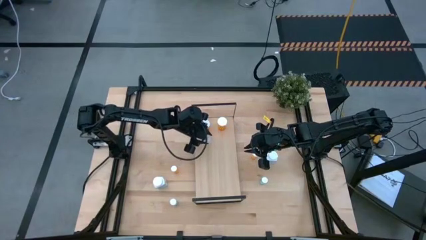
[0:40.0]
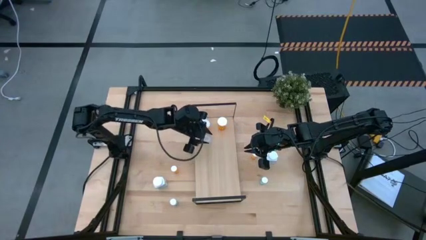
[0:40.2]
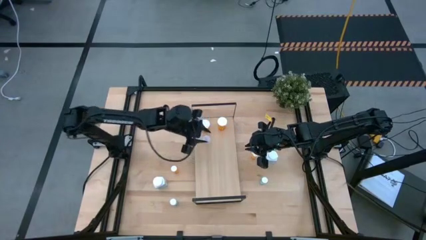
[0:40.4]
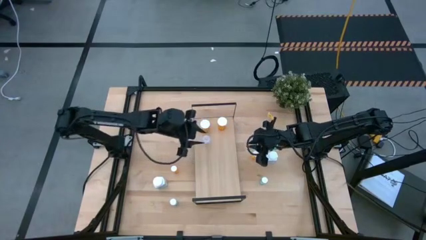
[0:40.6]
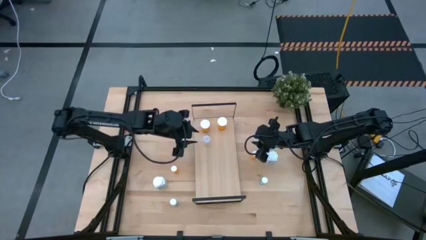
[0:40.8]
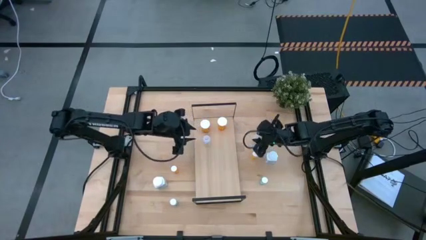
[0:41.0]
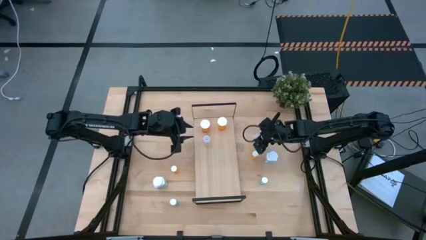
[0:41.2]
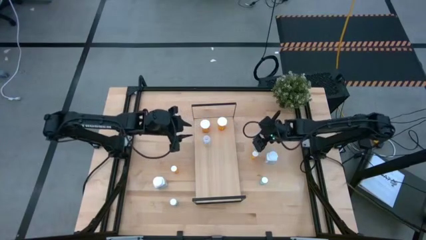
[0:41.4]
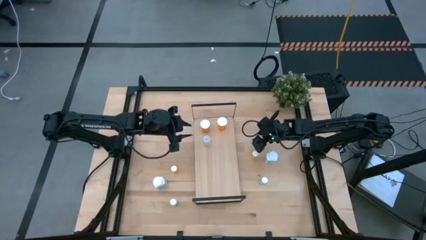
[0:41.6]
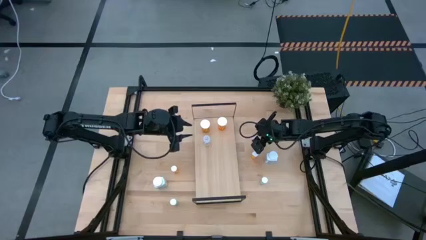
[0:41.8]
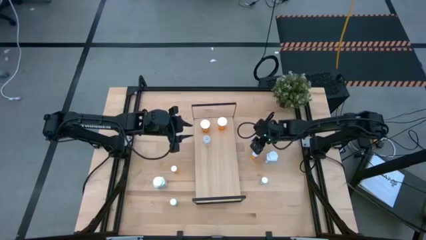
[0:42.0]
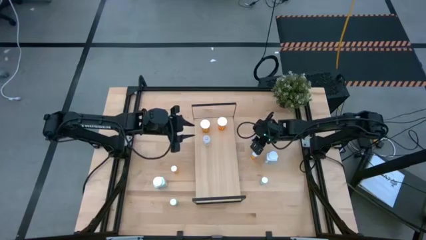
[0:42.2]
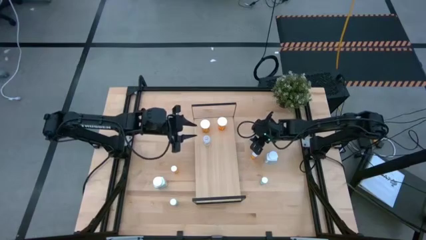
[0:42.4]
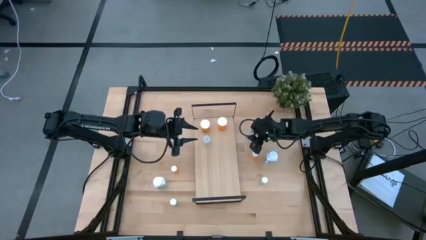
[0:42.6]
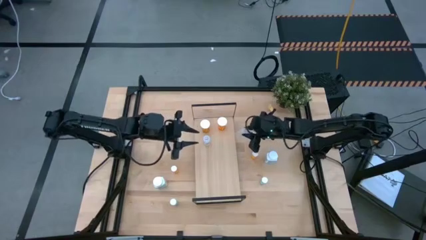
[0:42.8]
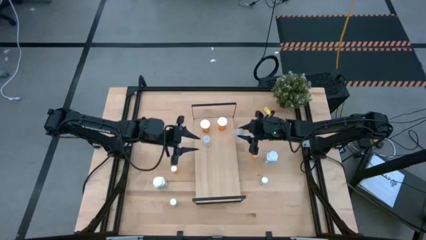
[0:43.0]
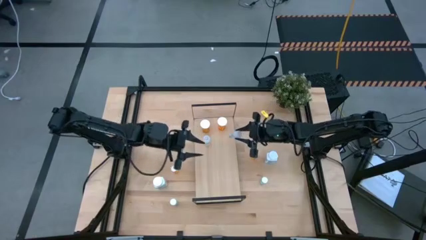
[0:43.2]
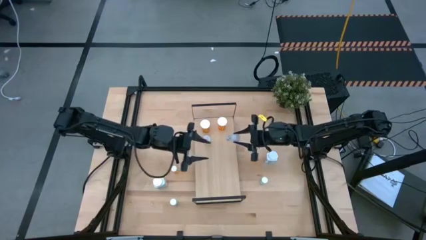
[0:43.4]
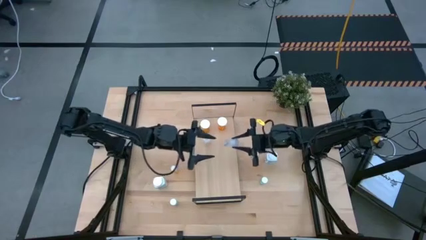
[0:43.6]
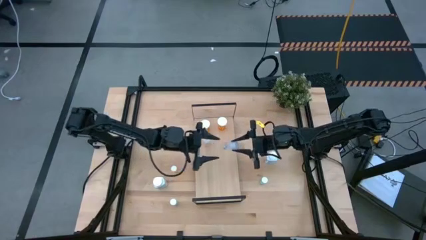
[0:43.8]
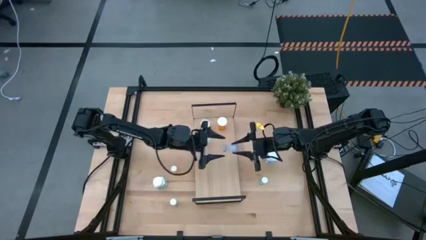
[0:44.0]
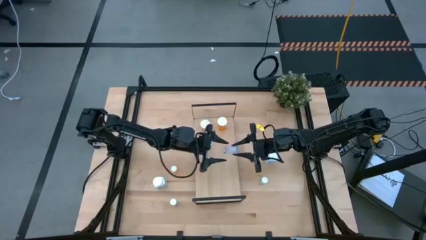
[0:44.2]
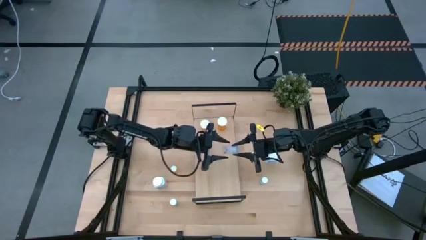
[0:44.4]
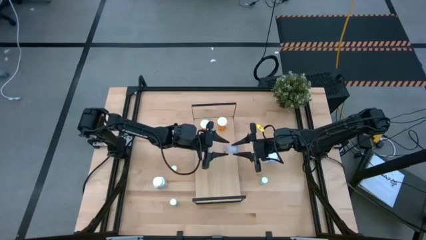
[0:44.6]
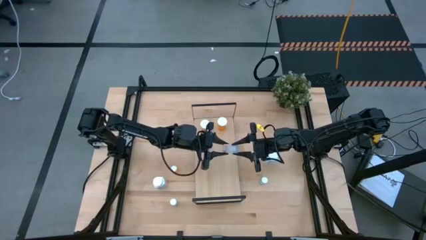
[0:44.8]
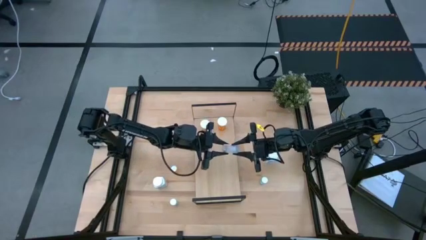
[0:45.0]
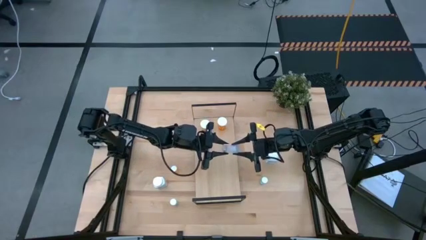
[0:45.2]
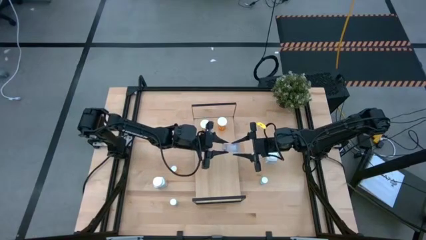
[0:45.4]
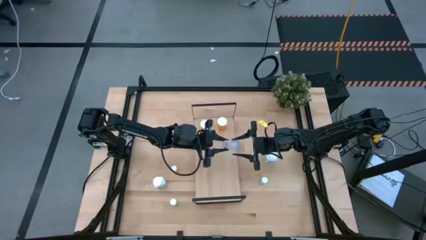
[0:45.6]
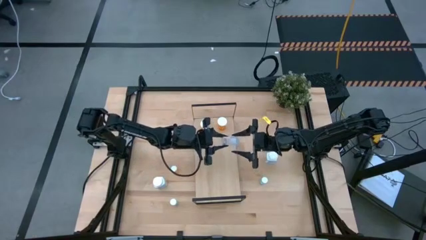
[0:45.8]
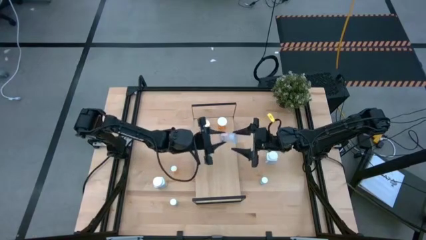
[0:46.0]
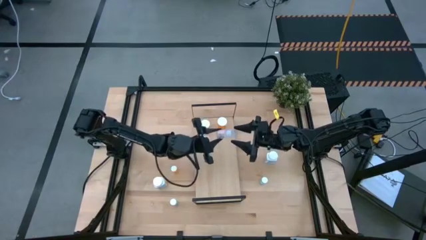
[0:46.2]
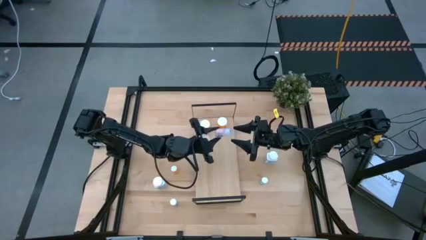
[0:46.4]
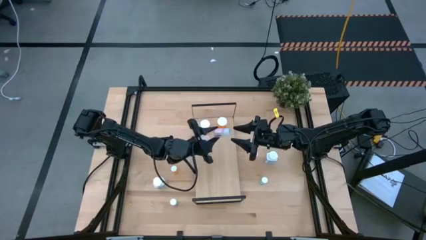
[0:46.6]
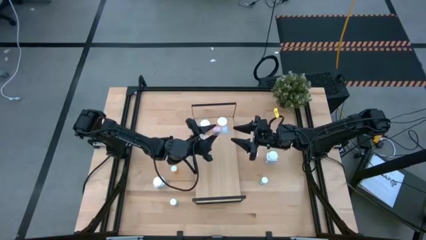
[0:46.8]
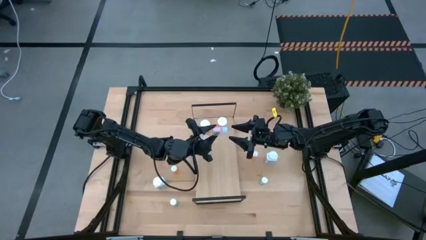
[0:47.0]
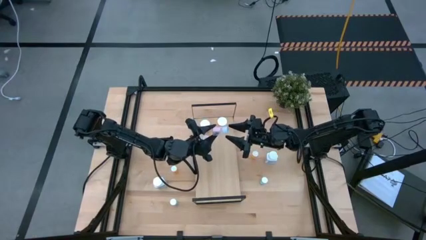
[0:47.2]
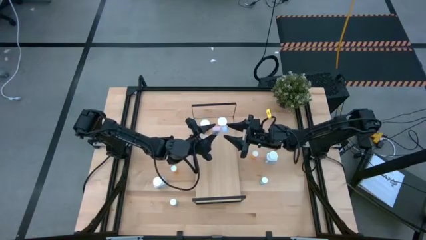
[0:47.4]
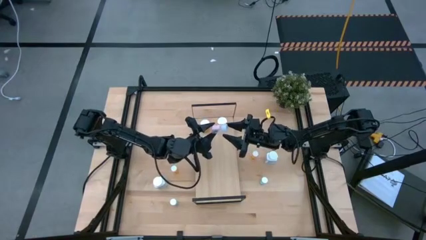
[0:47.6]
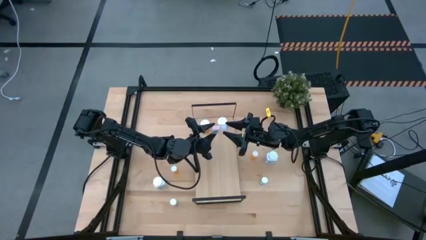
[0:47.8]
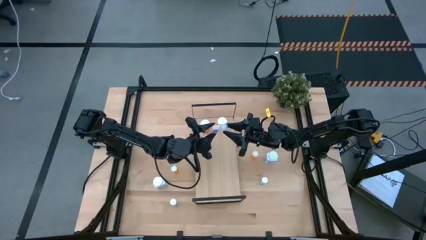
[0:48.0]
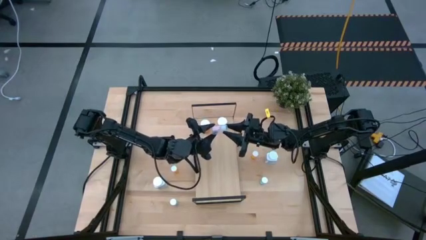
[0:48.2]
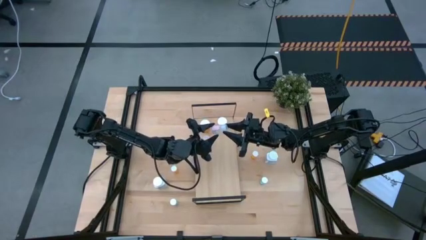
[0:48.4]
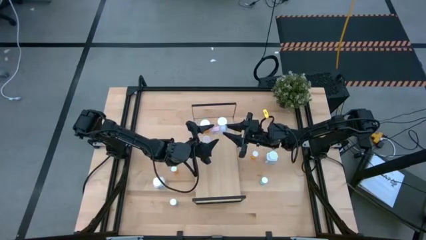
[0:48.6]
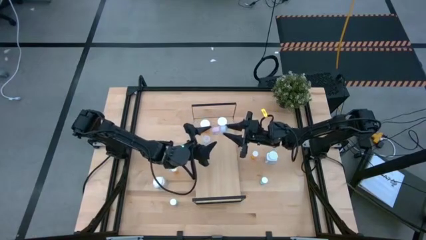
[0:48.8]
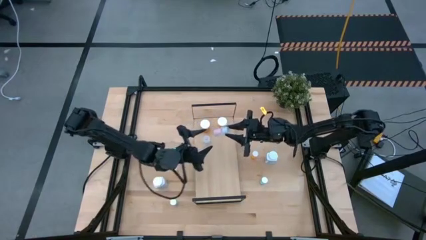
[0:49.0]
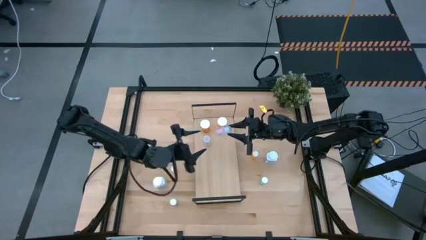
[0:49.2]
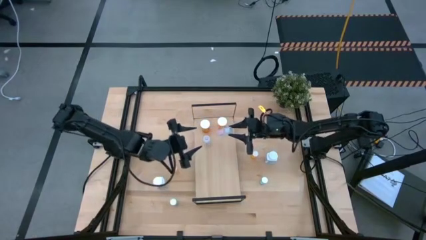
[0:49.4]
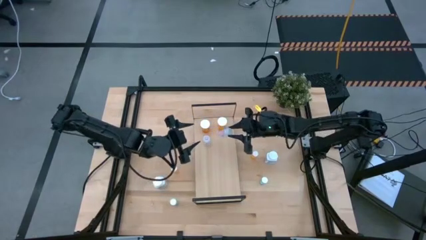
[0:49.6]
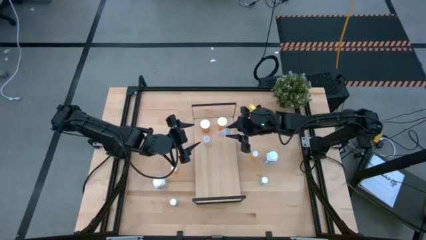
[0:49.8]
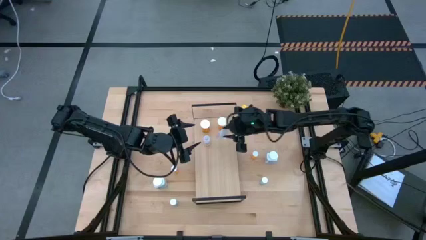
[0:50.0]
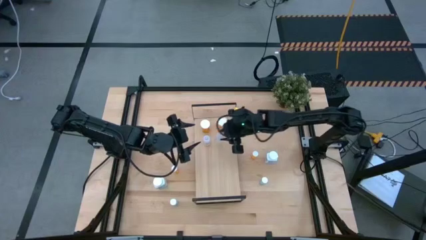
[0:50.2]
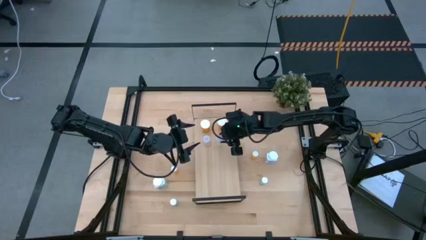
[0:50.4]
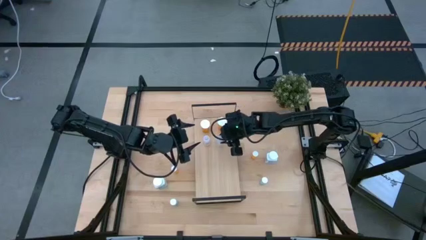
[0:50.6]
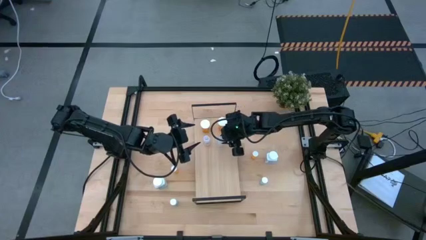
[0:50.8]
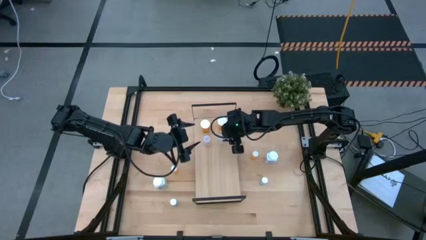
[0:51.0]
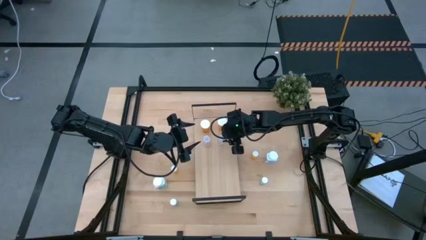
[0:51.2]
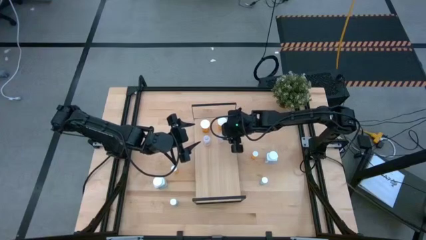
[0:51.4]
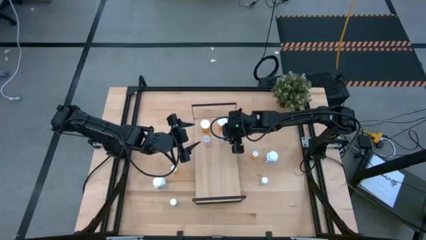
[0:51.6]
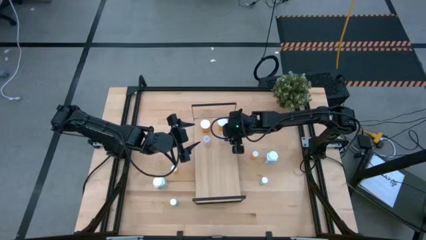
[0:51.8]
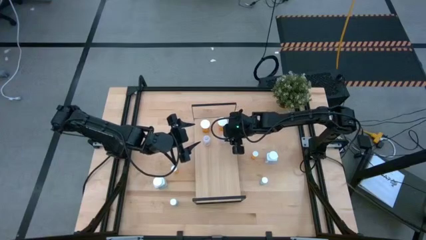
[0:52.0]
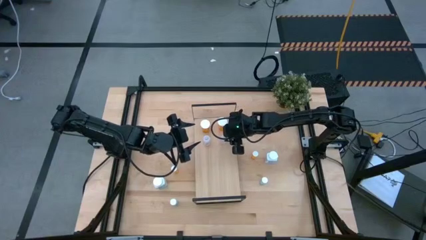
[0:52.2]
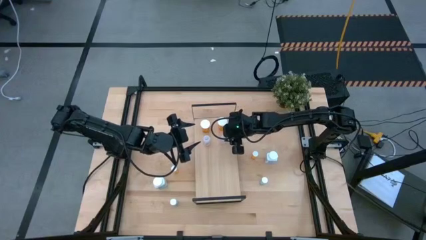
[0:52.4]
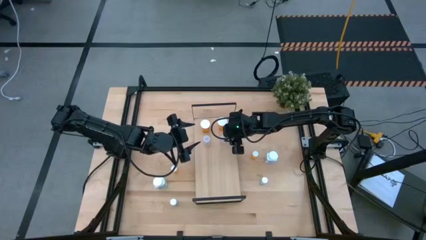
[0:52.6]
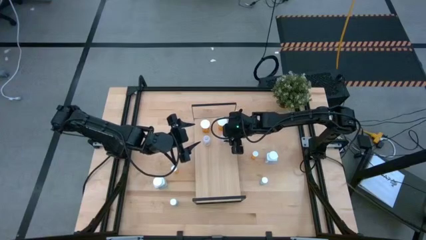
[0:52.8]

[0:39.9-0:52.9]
Task: Pick and place medicine bottles onto shelf by color
Put the transparent medicine bottle on the shelf

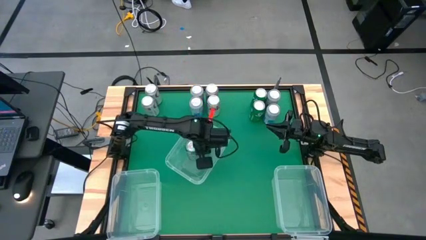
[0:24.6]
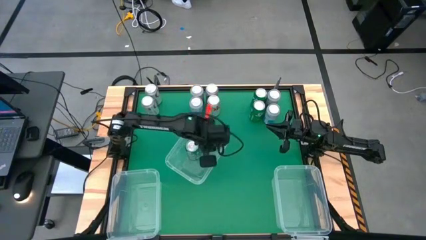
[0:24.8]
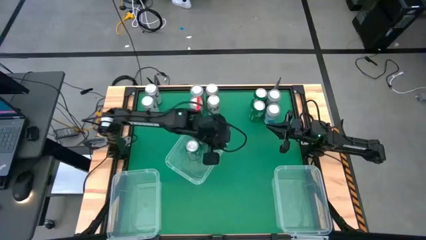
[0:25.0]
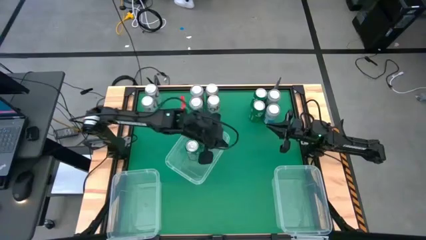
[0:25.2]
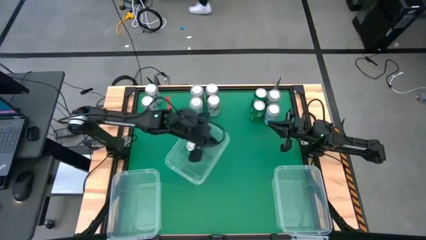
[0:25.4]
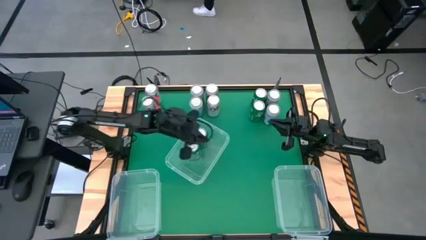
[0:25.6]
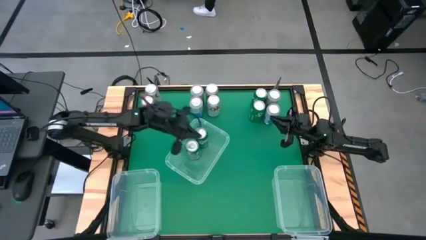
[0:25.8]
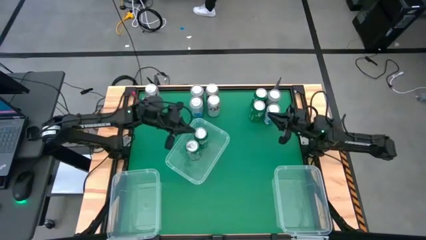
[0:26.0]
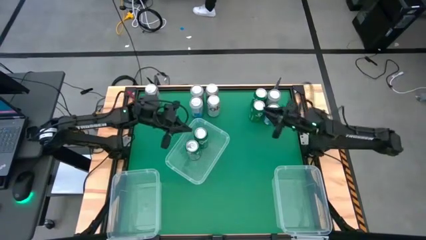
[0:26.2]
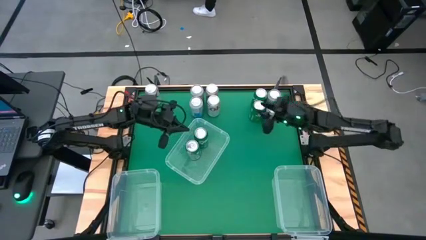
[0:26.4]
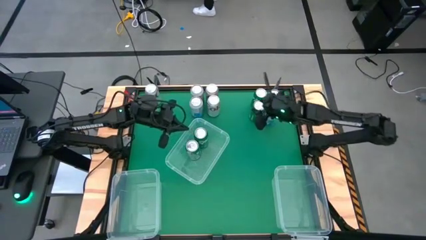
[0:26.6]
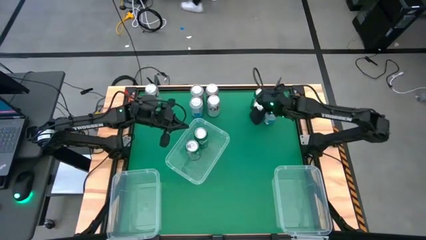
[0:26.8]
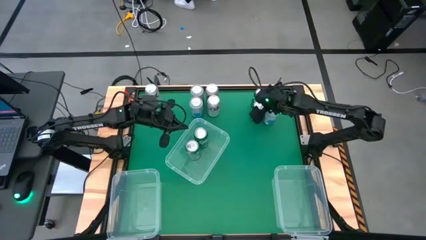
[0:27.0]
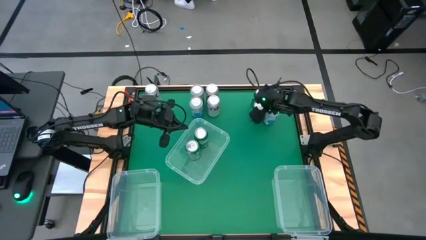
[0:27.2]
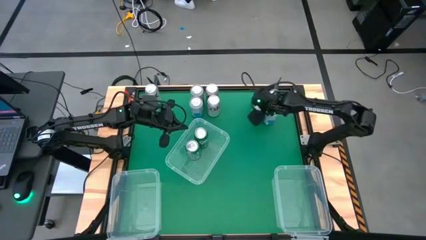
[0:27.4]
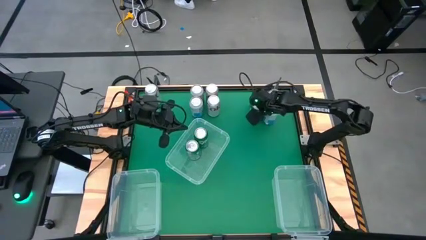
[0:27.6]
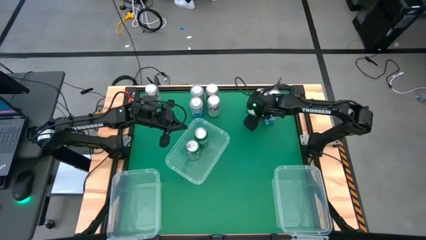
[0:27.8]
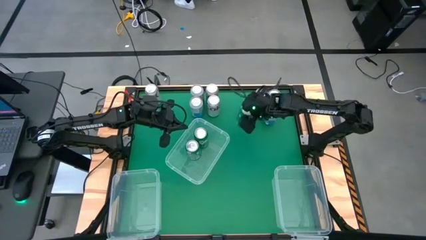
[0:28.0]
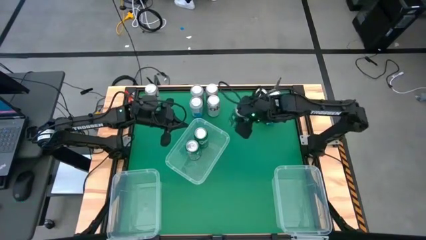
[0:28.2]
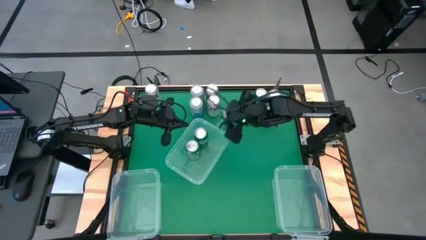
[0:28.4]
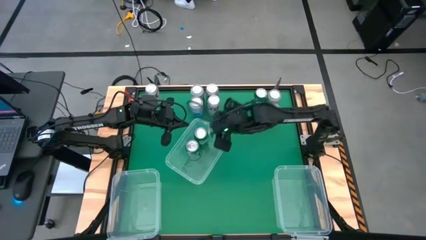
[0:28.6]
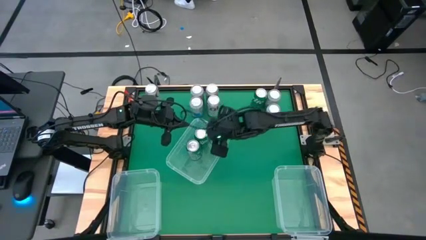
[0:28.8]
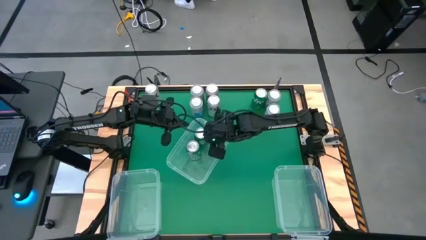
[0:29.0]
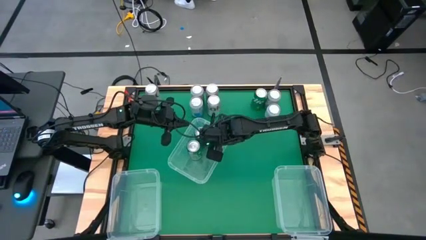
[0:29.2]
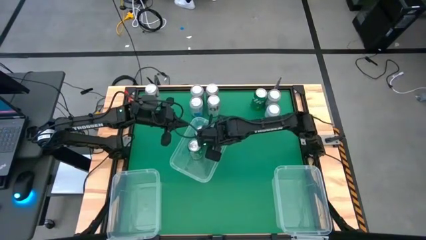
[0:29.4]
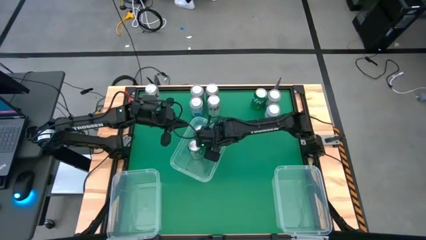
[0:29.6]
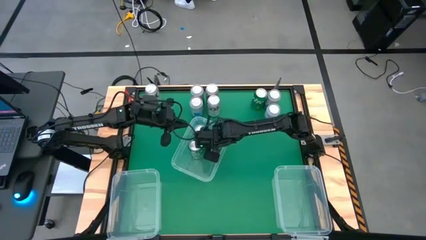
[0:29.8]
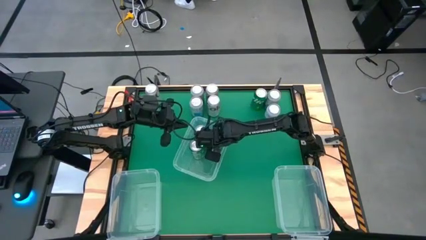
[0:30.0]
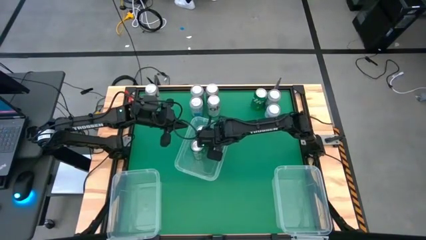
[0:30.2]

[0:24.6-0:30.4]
Task: Sort soda cans
Put the green soda can into the top bin
